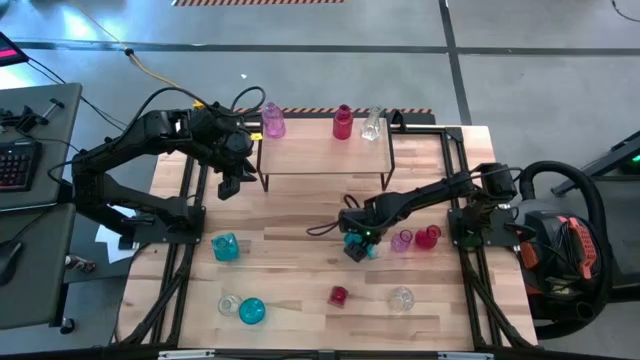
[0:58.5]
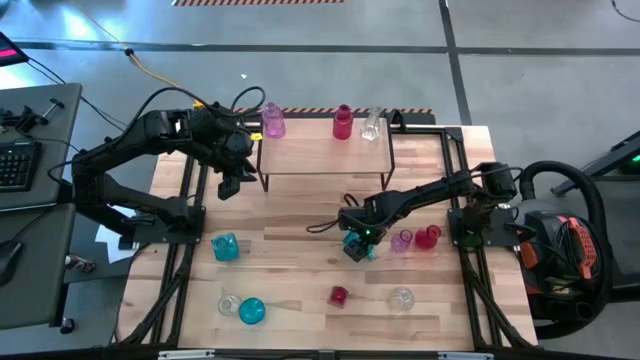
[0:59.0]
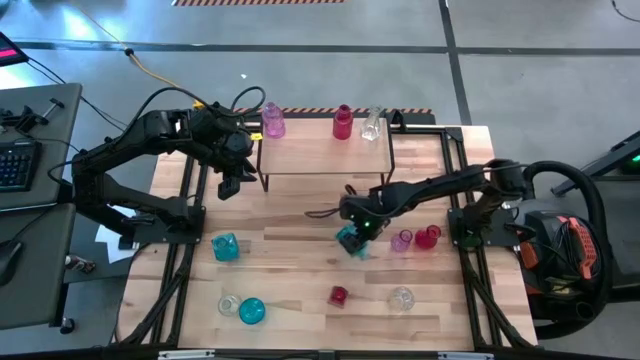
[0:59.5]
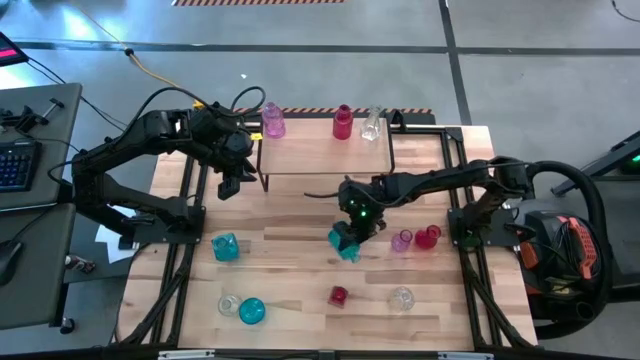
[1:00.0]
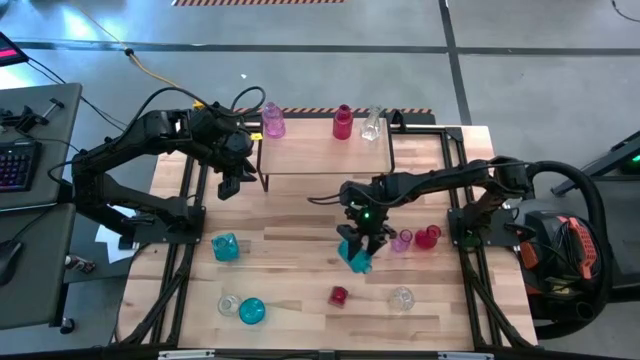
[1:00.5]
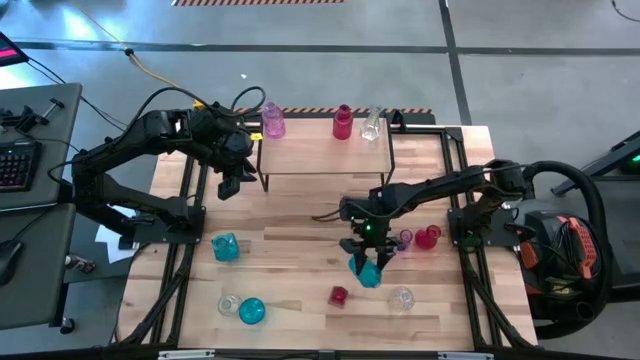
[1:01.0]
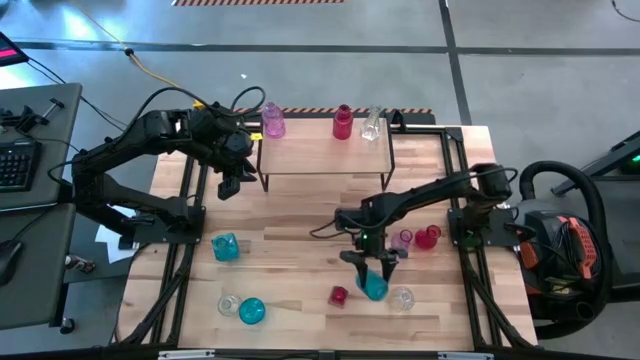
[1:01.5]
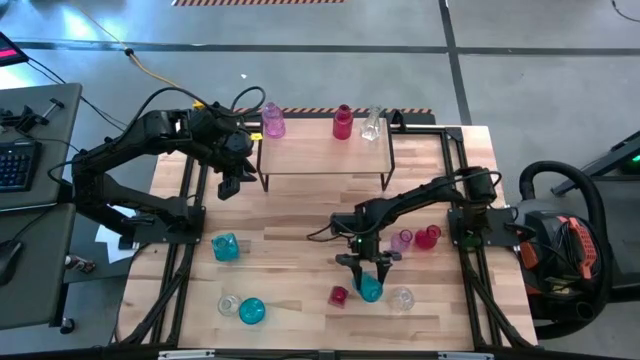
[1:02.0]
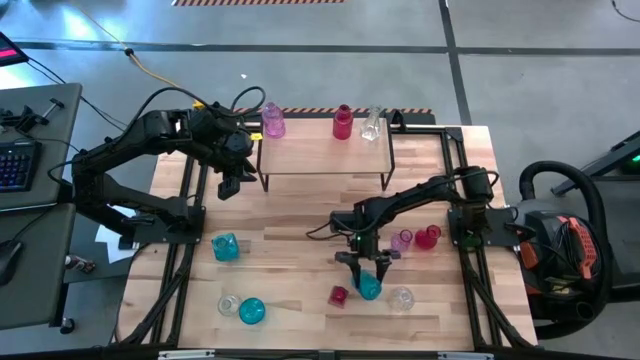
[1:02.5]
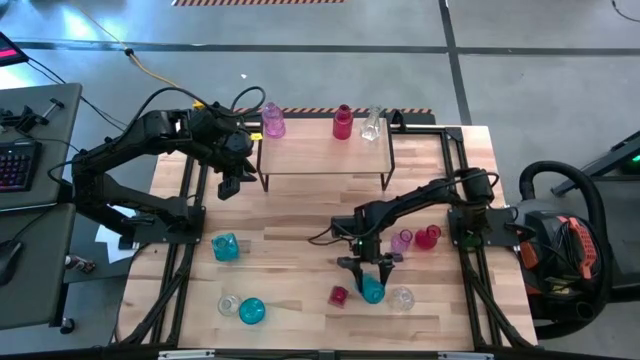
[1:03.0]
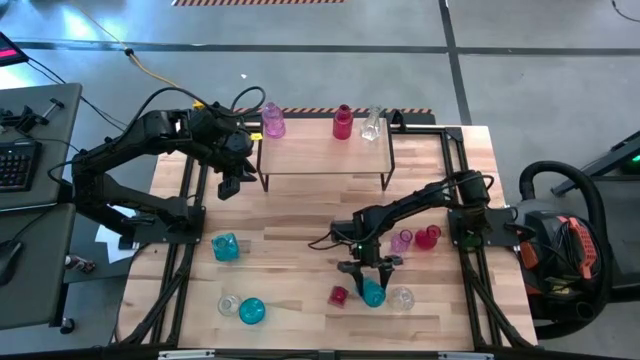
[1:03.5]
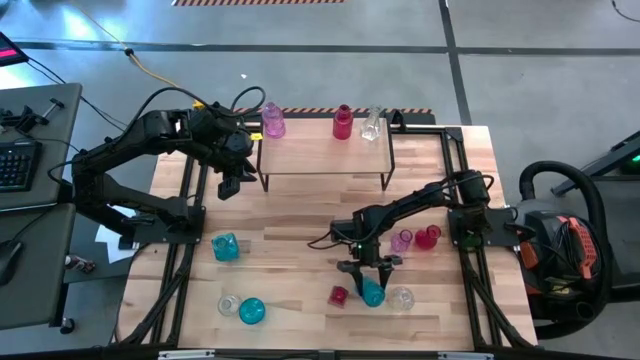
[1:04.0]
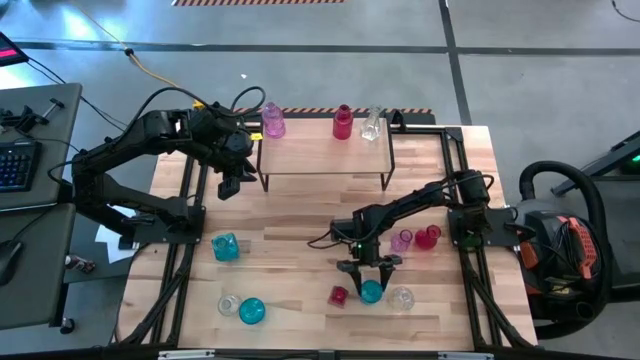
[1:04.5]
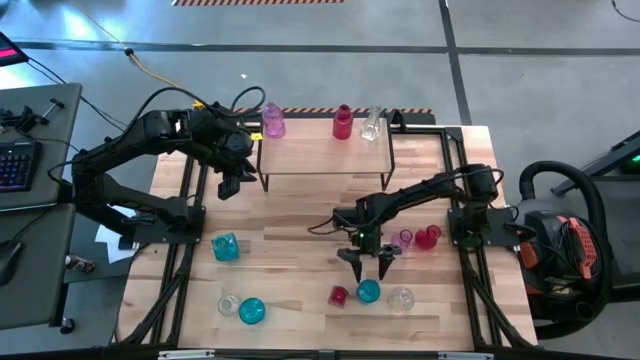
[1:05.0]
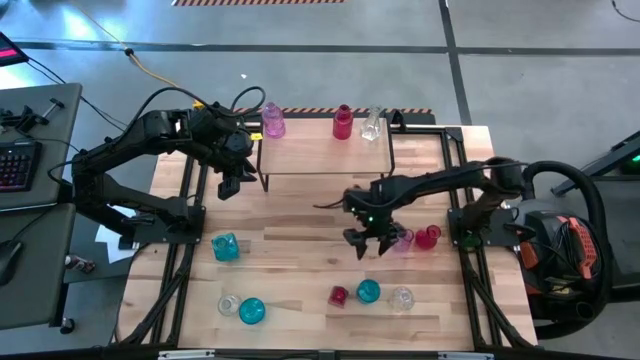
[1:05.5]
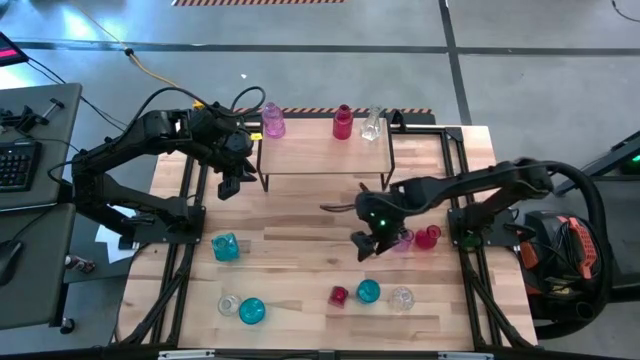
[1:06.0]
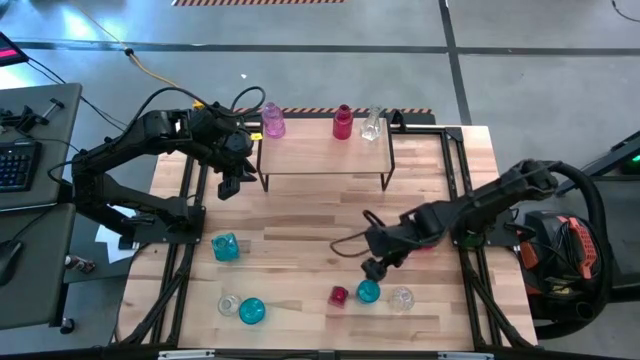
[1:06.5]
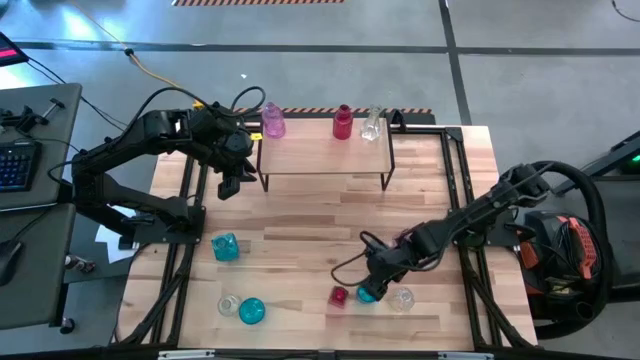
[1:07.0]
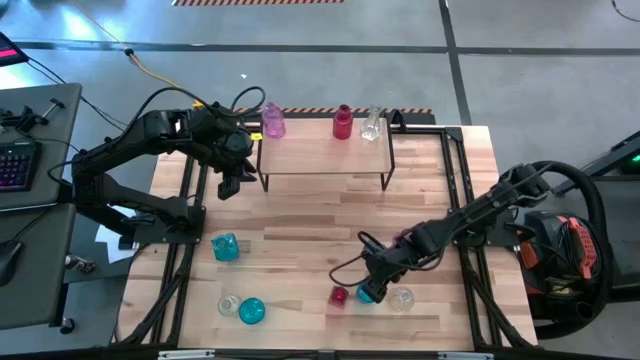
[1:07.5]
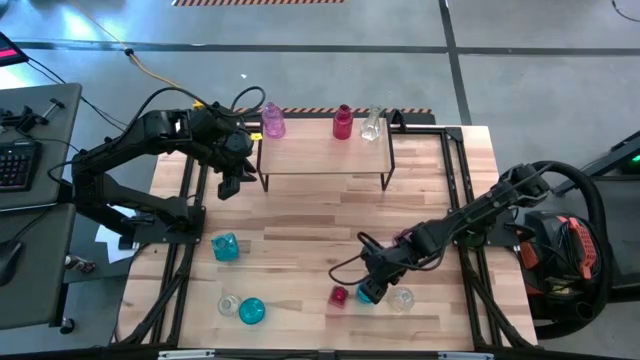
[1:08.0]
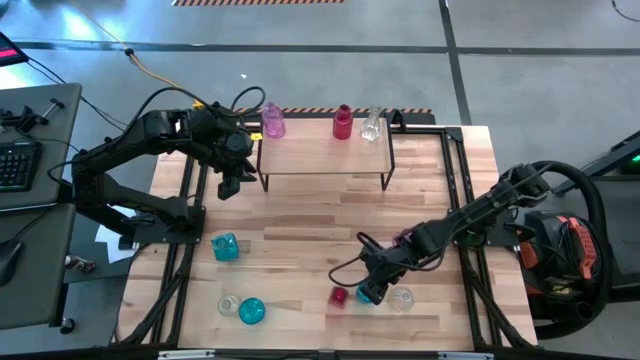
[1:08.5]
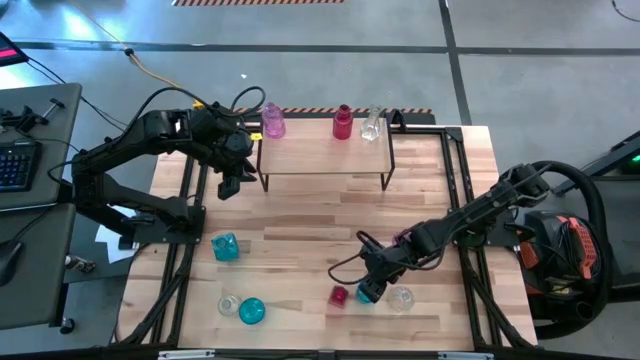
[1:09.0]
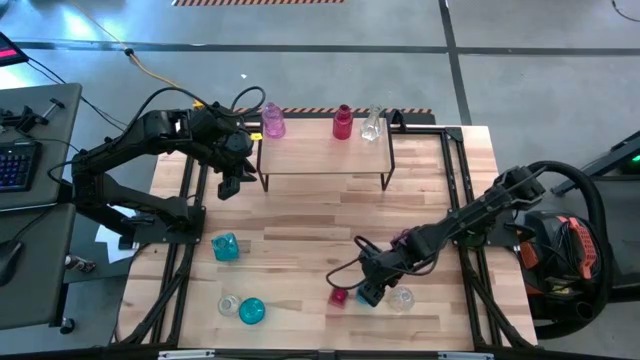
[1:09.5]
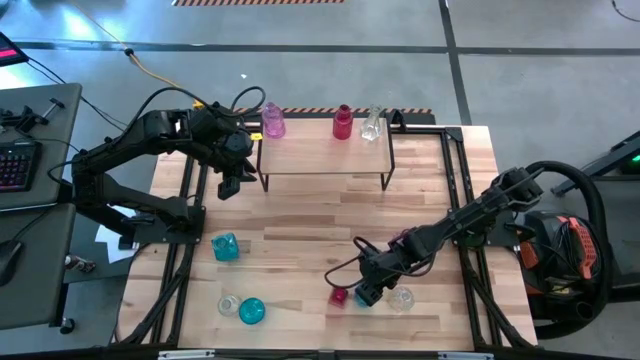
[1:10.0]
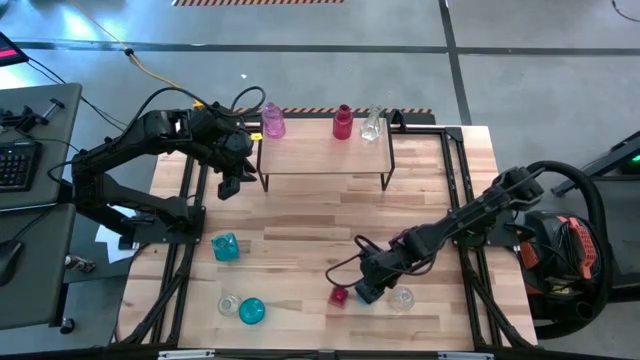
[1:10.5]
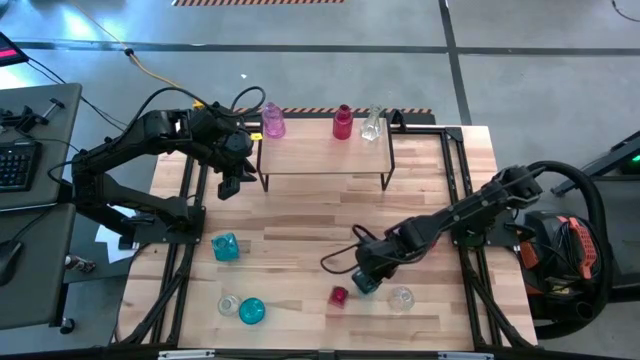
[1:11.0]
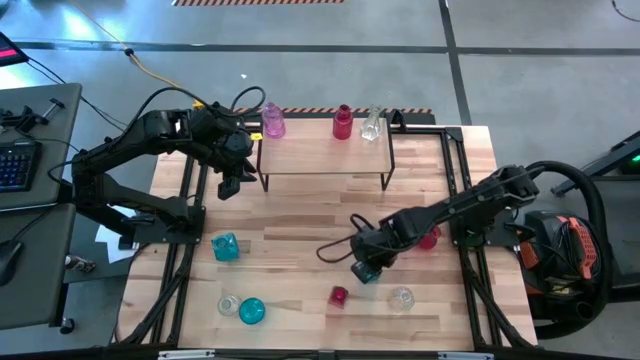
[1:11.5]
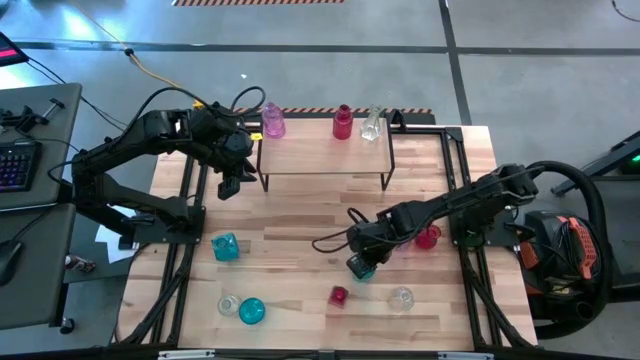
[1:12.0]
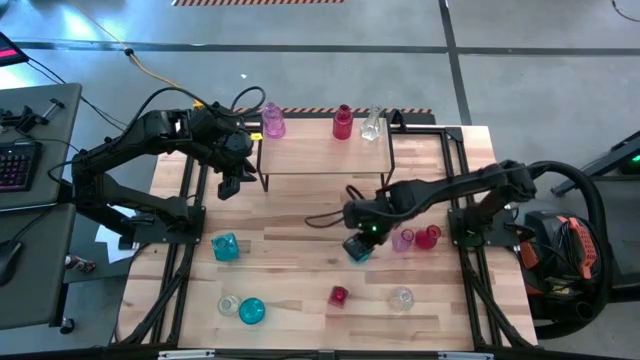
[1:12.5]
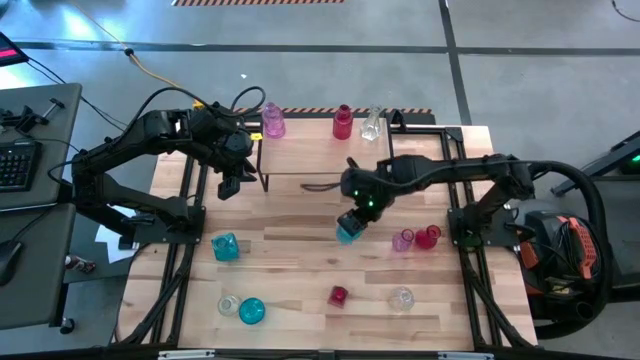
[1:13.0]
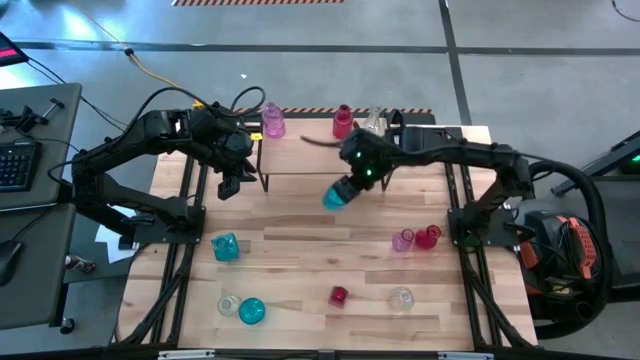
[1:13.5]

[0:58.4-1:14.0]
Task: sort vases onto shelf
Put the bottom right blue vase on the shelf

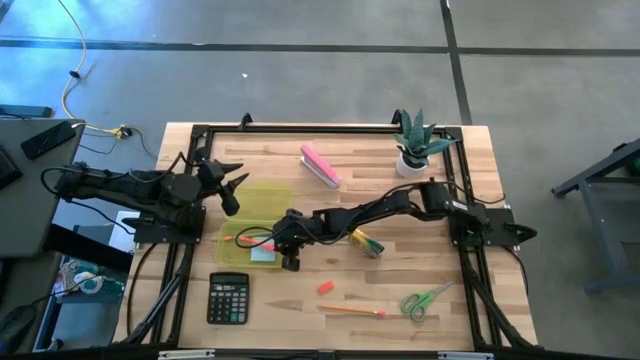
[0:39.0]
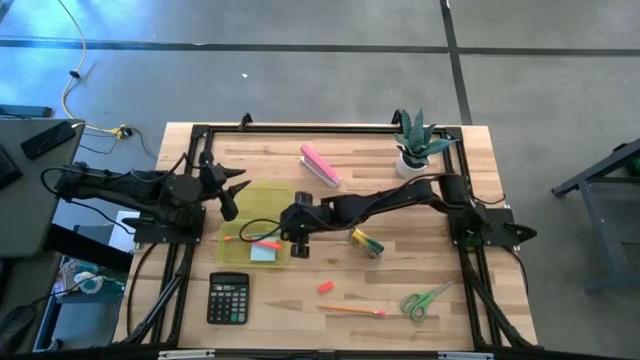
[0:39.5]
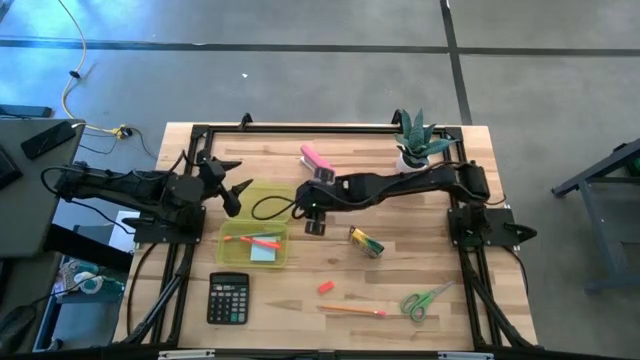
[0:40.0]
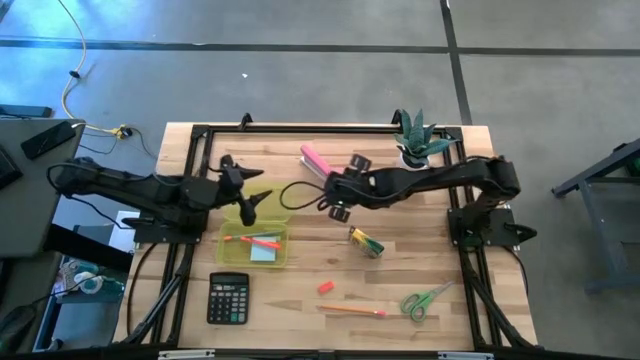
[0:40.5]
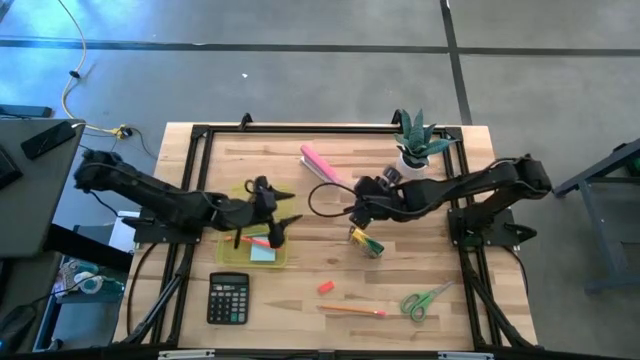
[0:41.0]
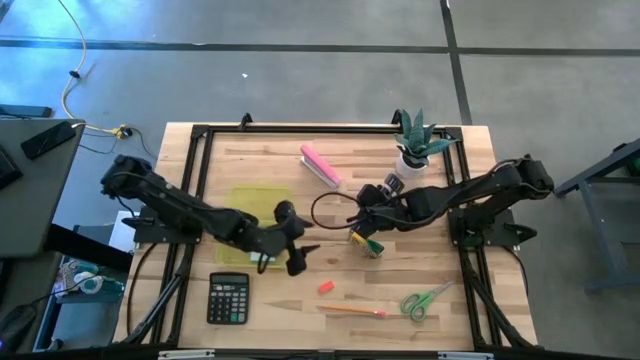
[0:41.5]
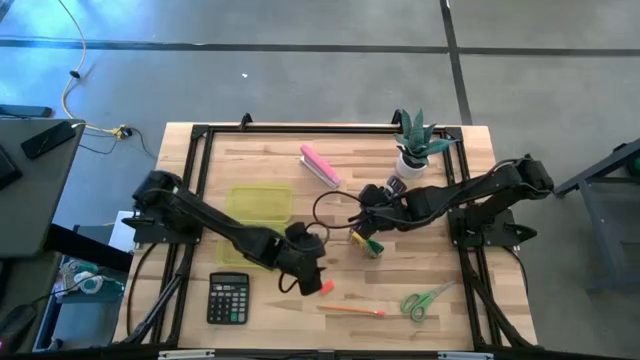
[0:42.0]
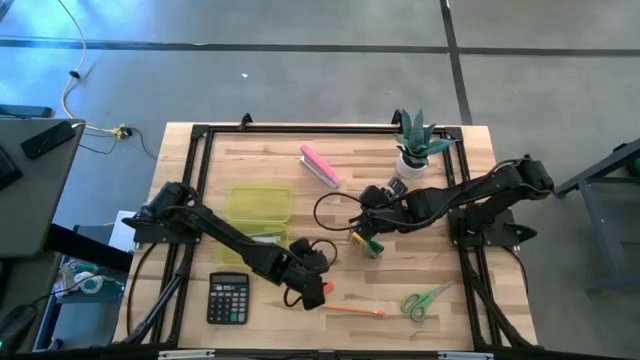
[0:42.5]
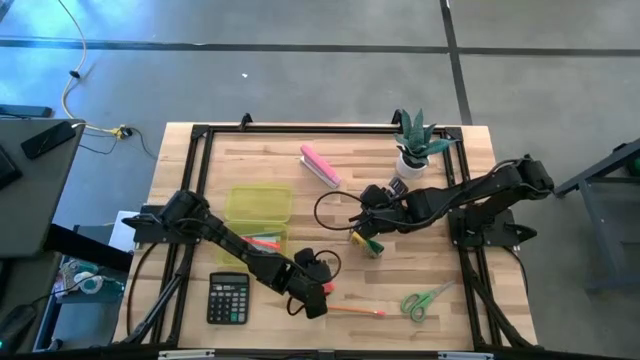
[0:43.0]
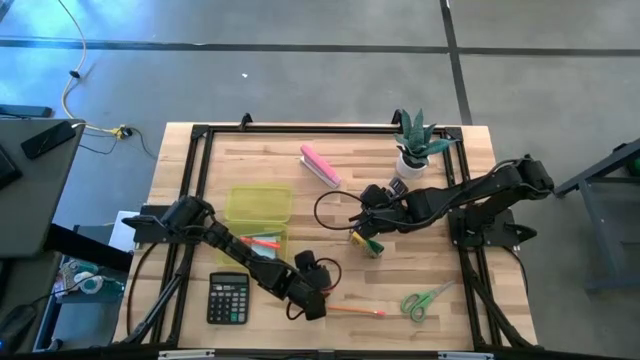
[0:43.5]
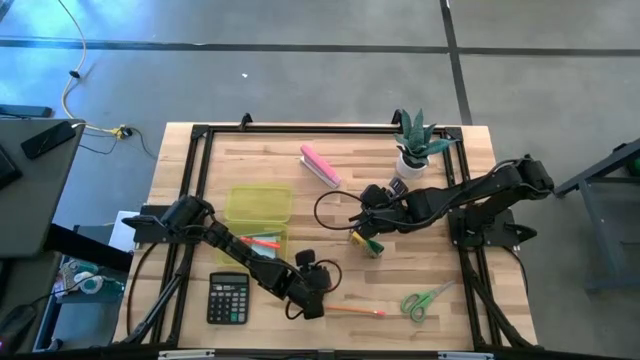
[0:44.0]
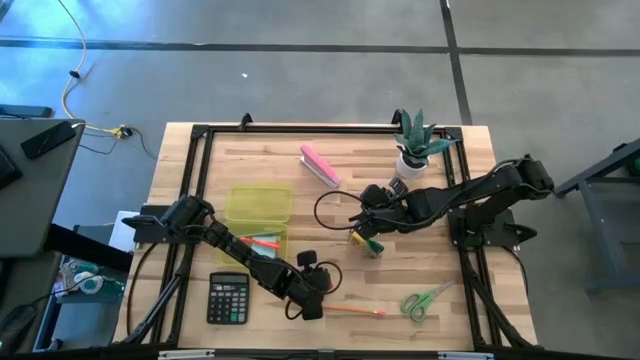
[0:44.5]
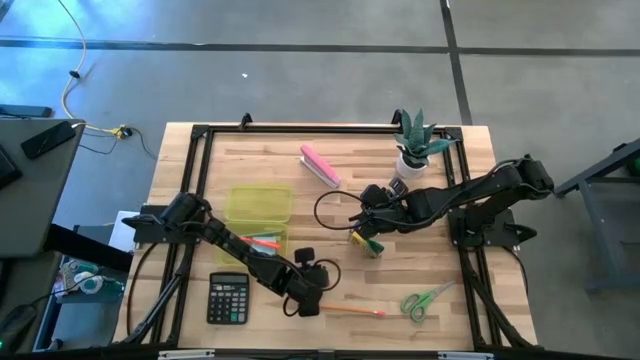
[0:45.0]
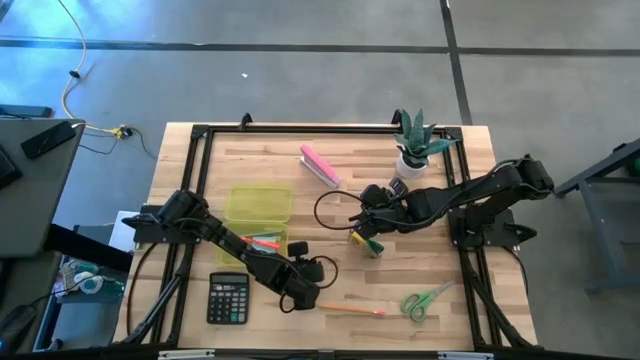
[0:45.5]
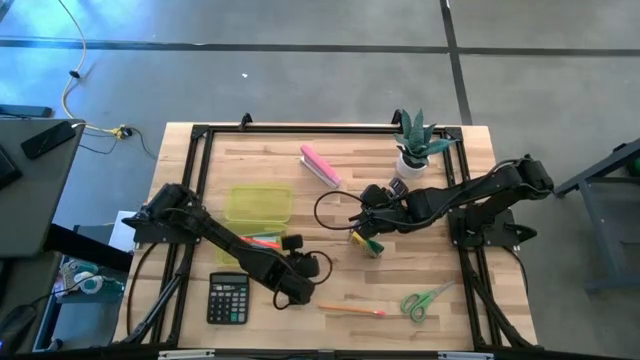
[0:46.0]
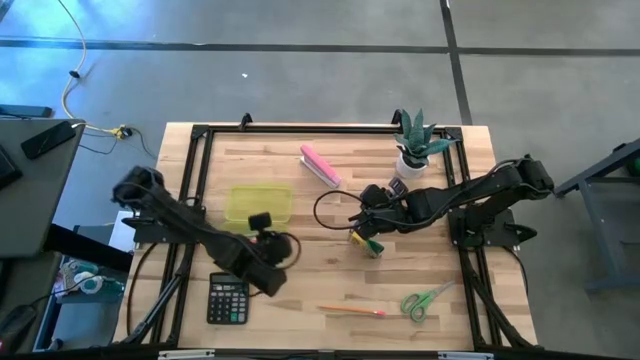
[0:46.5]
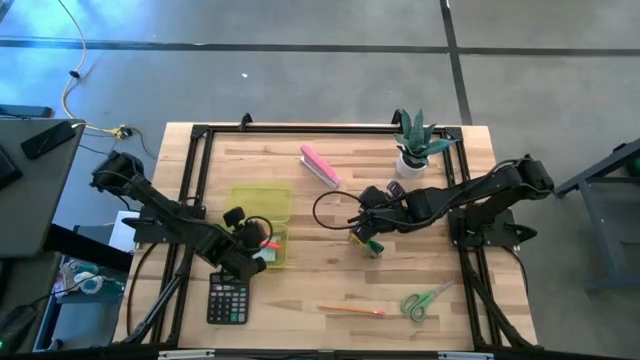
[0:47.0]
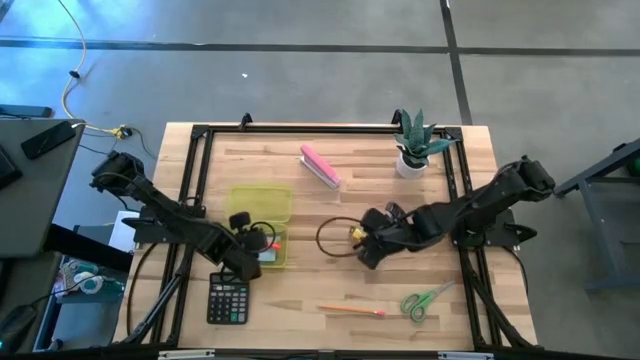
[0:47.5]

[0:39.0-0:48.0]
Task: Pack school essentials
Put the orange eraser into the yellow supply box
